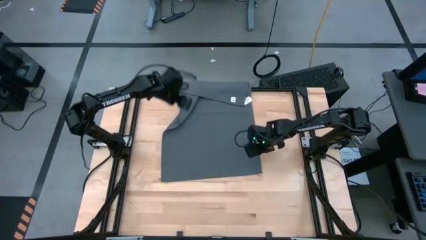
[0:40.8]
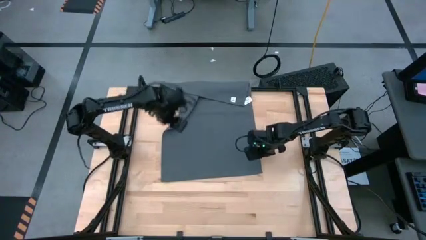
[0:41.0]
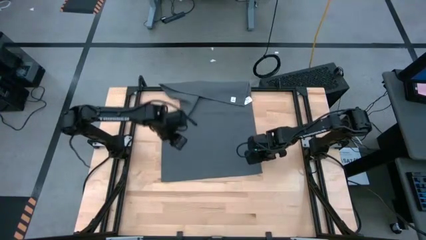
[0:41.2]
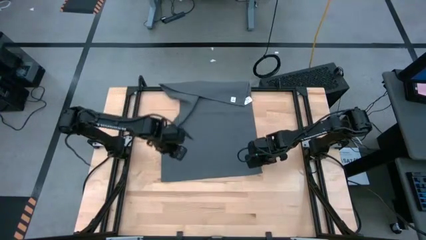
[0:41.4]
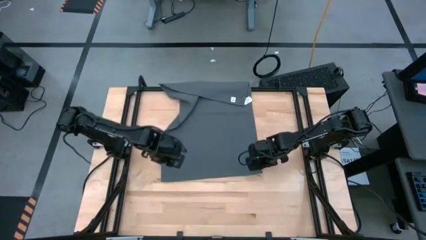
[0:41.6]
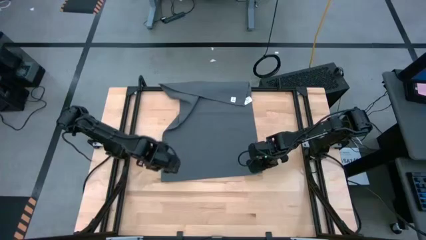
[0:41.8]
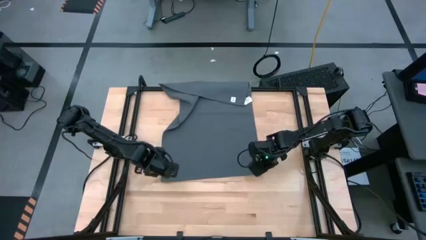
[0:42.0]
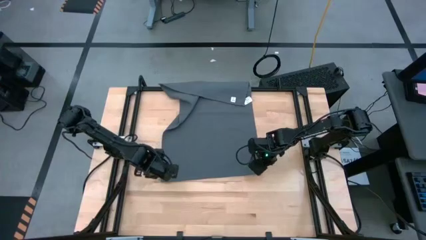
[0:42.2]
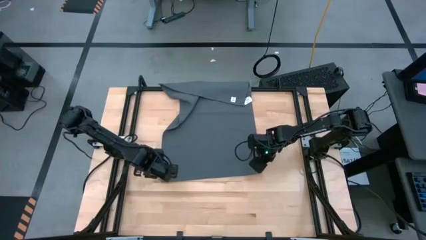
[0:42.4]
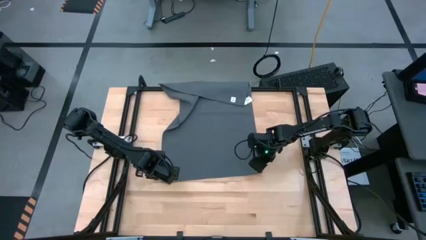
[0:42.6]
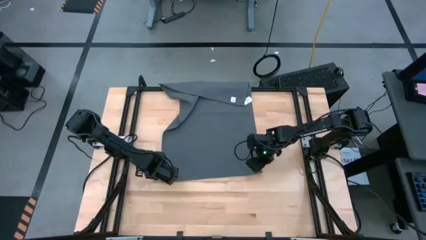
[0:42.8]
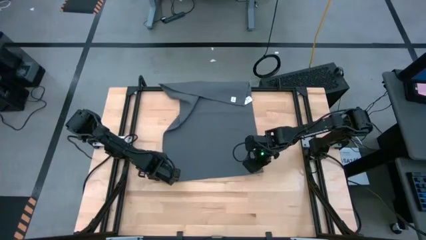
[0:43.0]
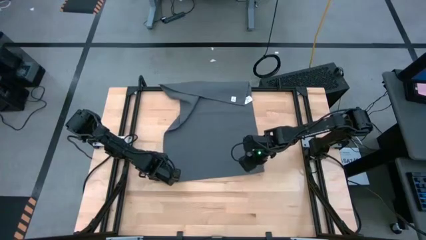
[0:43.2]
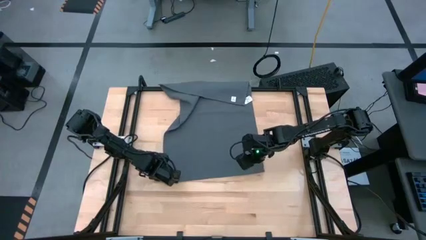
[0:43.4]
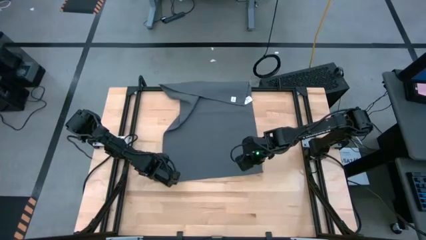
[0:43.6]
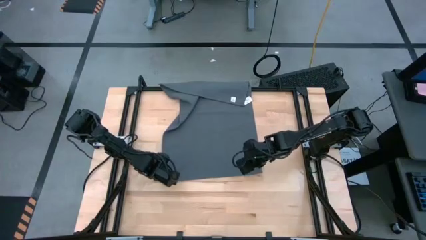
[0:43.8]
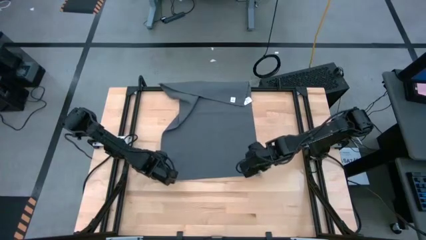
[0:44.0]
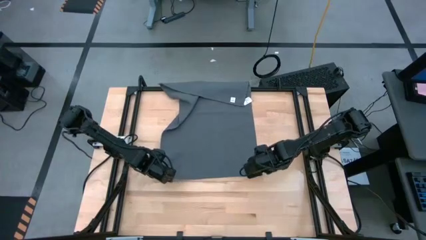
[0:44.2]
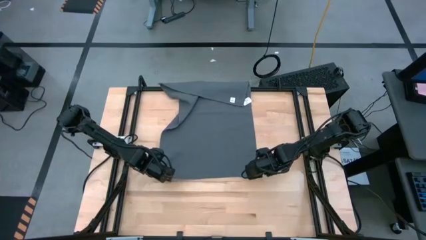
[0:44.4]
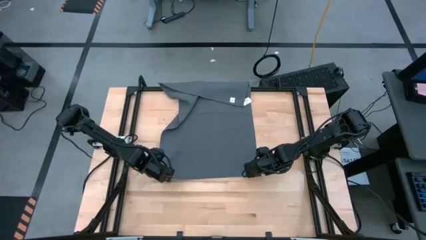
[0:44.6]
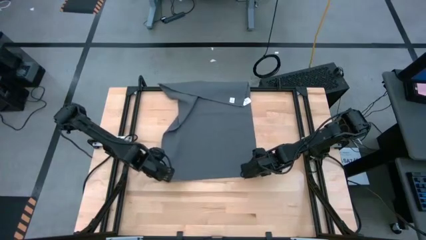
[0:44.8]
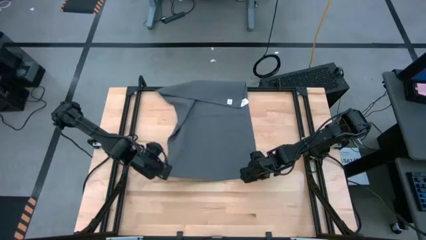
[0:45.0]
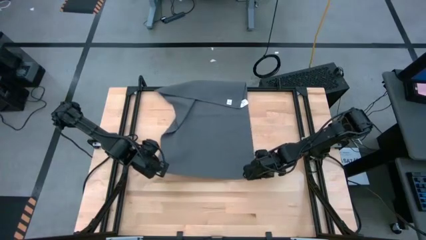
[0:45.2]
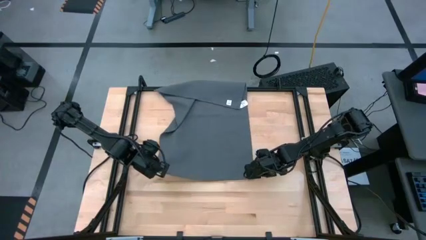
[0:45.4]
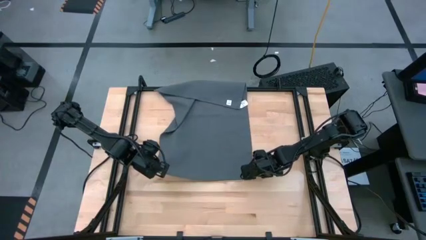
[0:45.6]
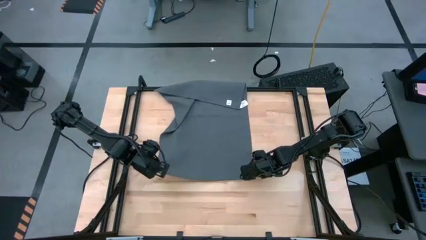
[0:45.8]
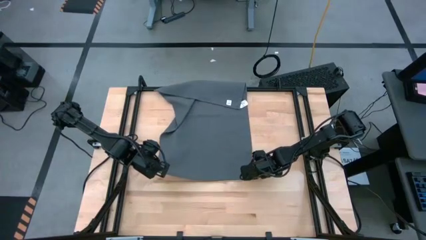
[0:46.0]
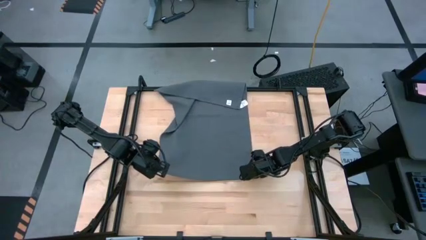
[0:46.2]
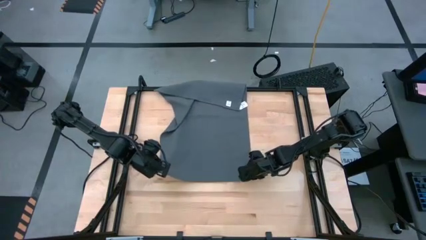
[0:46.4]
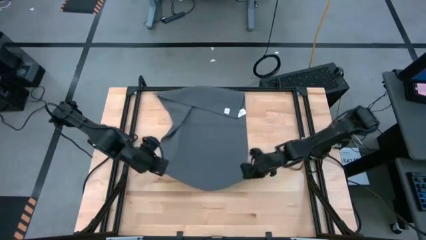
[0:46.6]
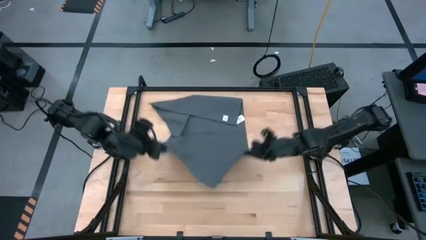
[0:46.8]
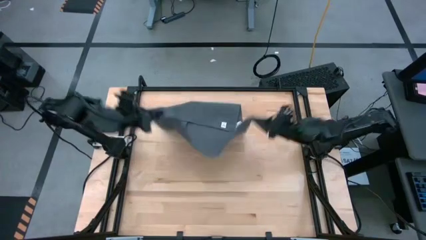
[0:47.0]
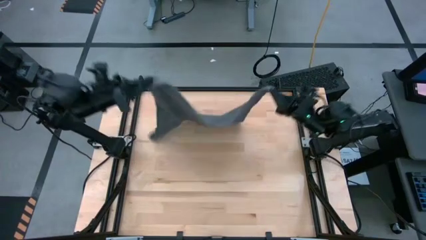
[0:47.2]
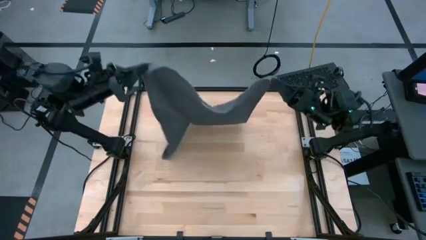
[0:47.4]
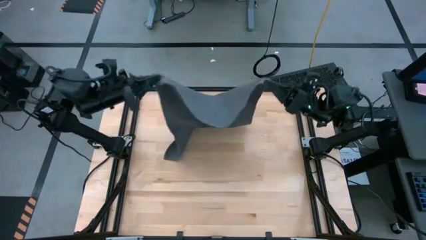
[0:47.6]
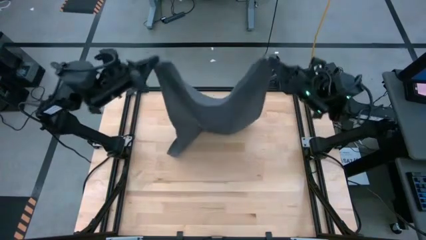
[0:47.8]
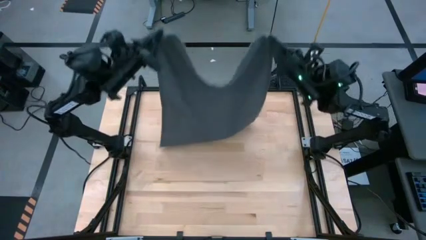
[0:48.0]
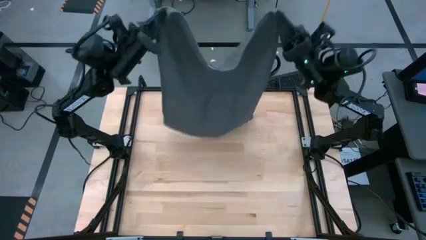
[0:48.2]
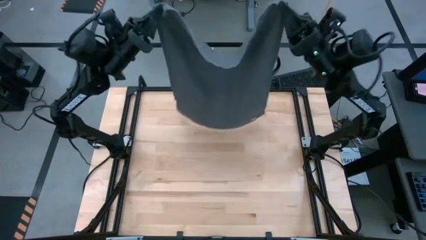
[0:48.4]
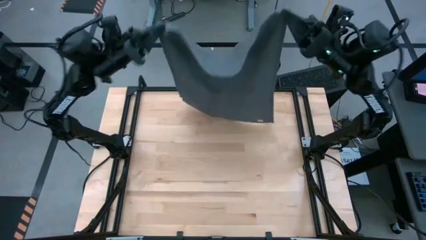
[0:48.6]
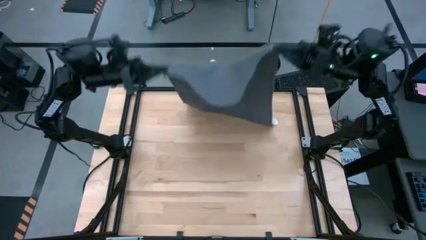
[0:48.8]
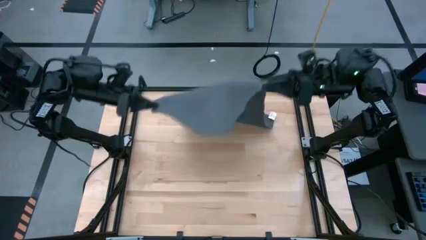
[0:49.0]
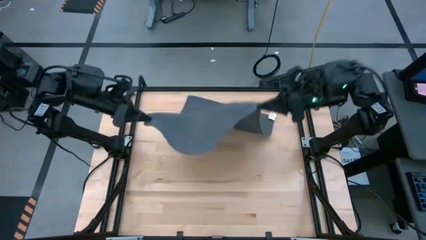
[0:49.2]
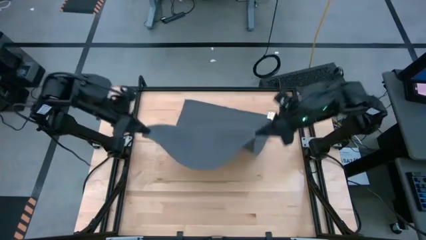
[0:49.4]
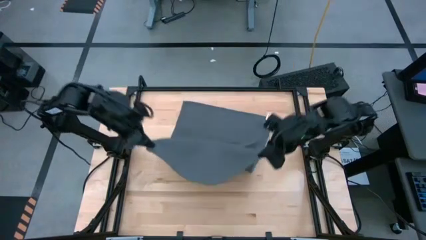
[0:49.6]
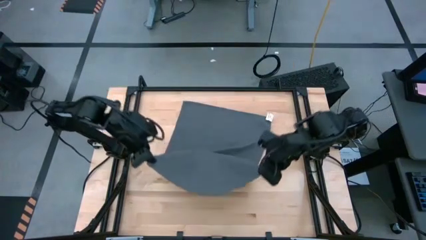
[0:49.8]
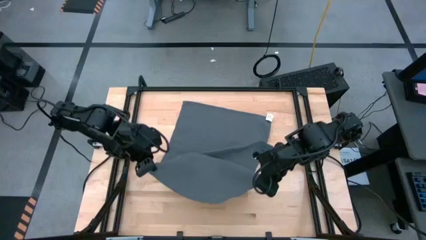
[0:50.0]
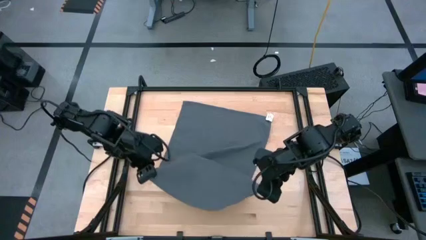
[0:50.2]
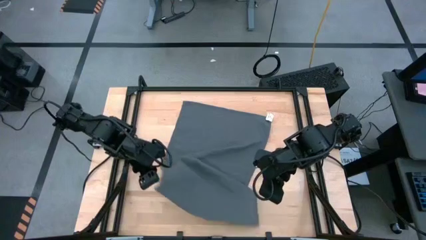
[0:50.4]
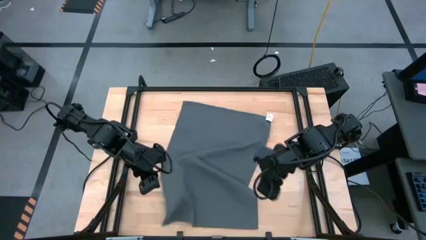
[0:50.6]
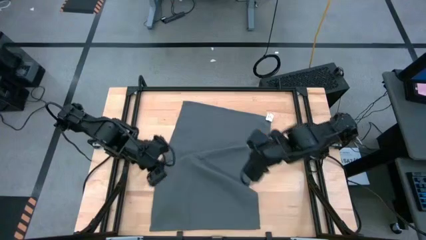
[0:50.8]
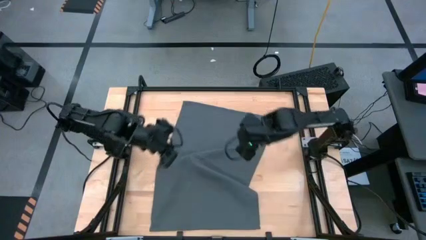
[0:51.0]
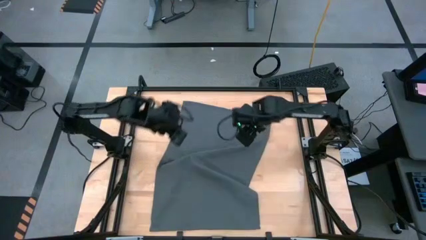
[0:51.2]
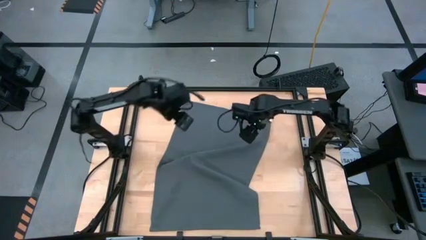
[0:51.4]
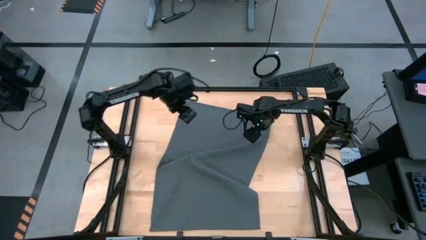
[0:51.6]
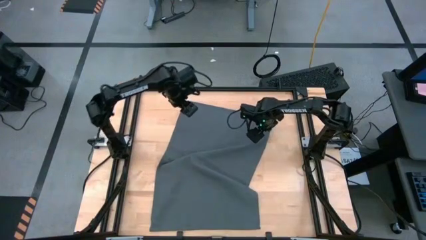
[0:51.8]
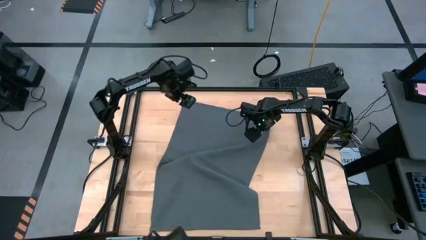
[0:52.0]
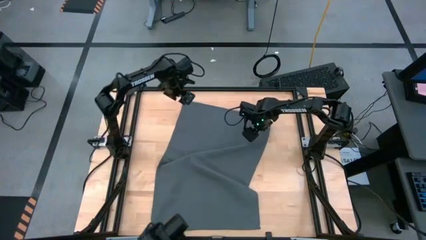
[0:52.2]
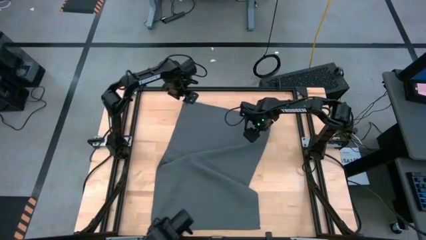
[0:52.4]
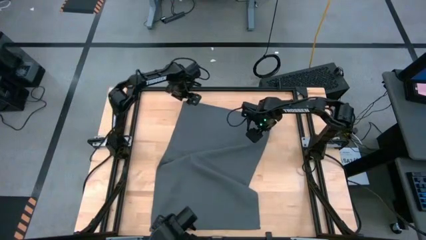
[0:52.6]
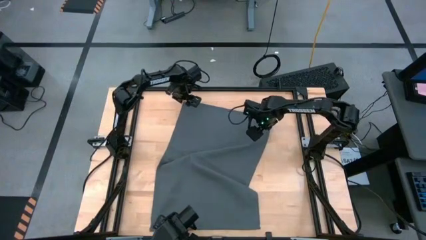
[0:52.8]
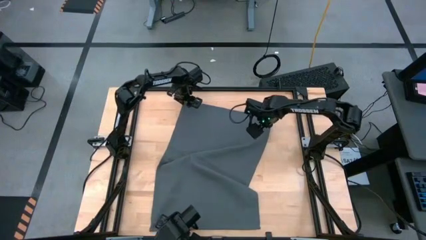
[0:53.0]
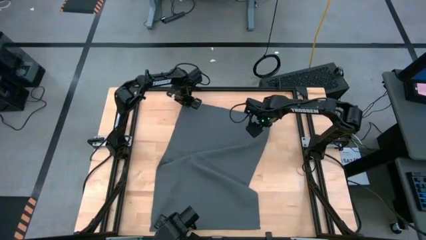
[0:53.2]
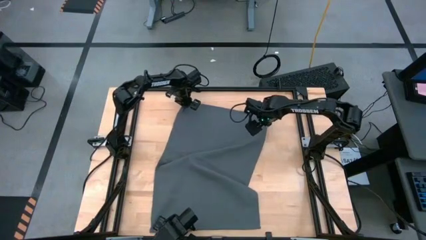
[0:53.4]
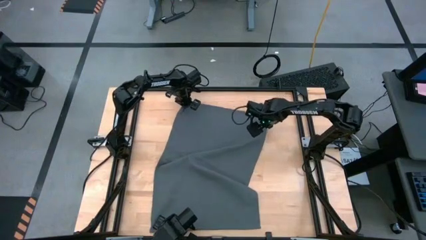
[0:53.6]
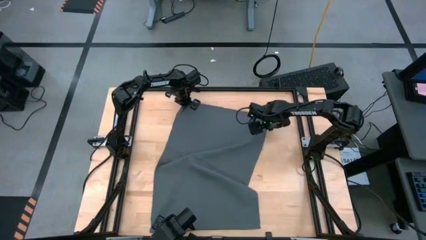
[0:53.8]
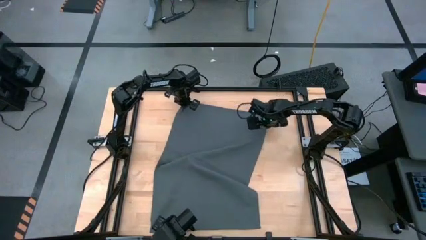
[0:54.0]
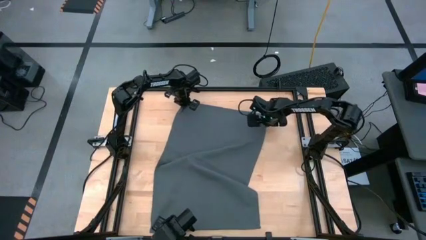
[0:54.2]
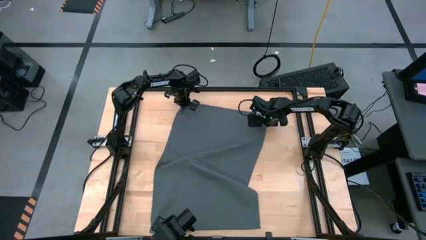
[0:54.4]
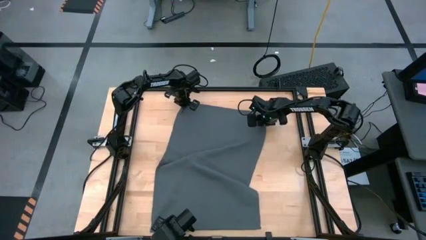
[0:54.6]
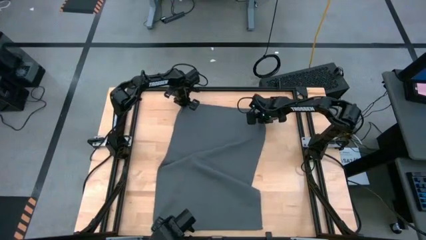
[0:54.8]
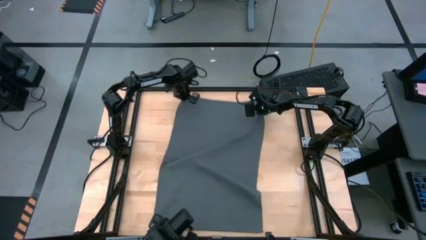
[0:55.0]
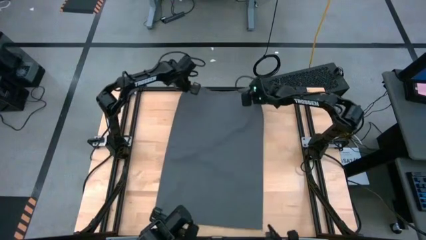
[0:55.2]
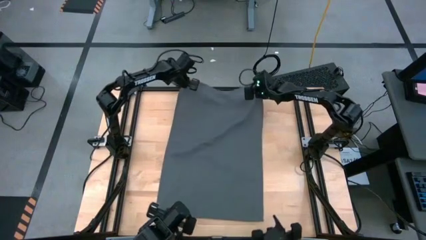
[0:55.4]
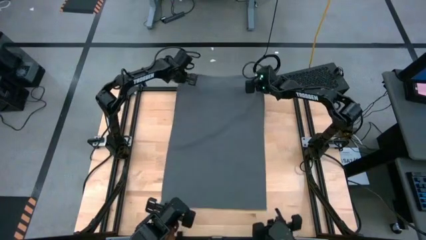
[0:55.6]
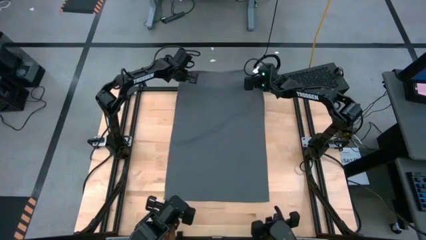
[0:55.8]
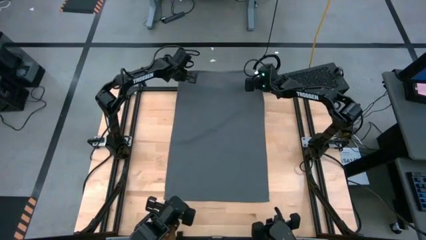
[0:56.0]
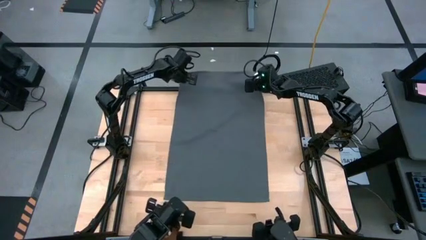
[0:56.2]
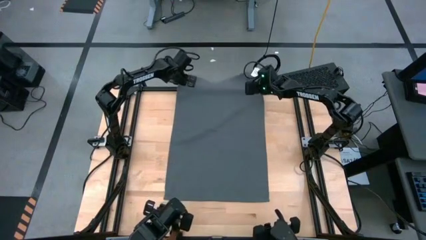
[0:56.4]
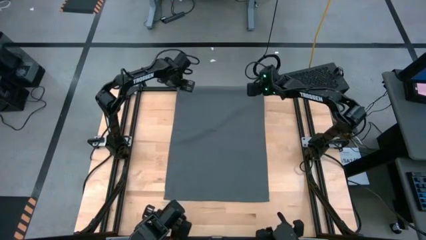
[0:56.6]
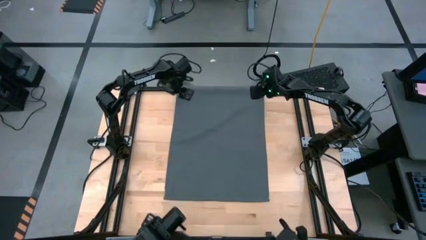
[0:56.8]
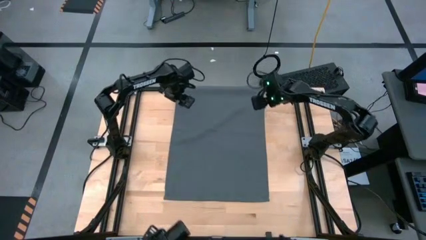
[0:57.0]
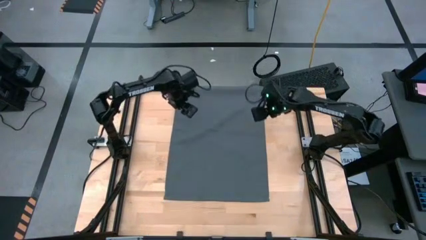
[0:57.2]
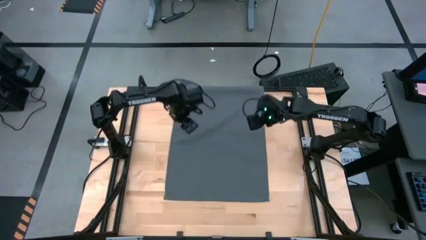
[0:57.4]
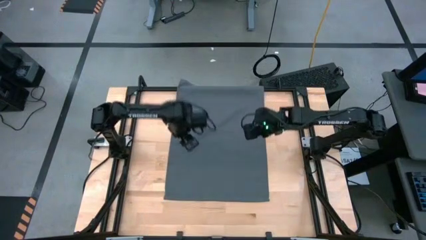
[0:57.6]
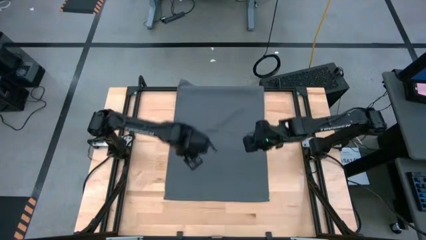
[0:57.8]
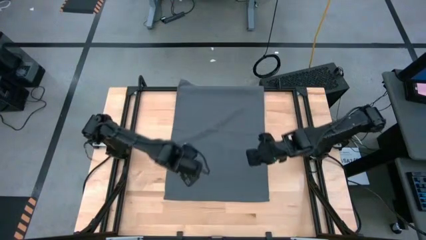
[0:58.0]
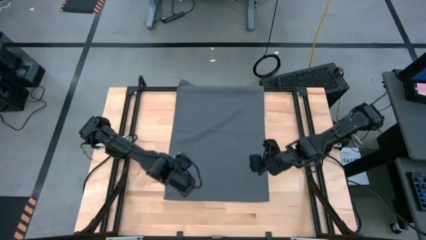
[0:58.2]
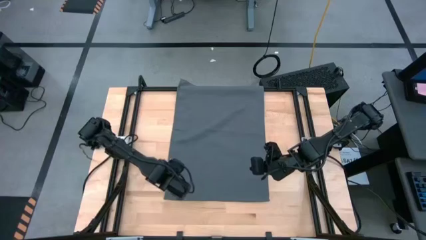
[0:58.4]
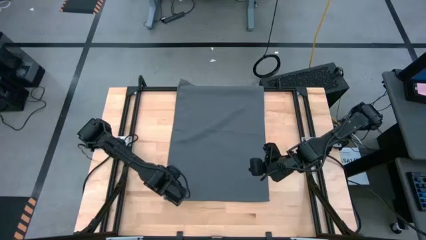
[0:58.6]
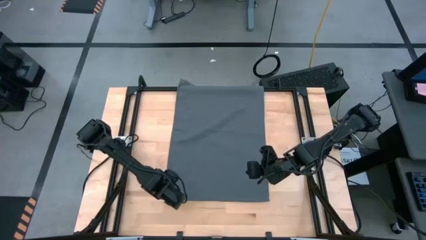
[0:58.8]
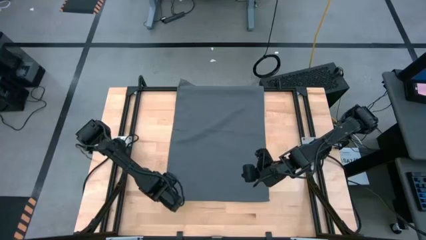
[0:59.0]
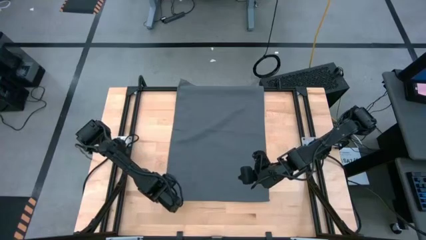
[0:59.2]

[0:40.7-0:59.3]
Task: Roll towel into tight, uniform cylinder
Roll the towel
